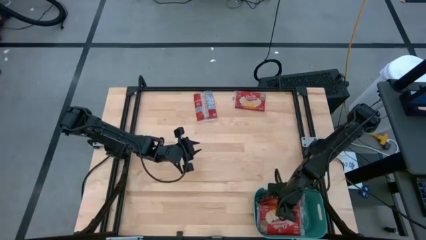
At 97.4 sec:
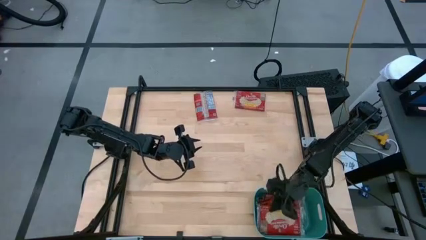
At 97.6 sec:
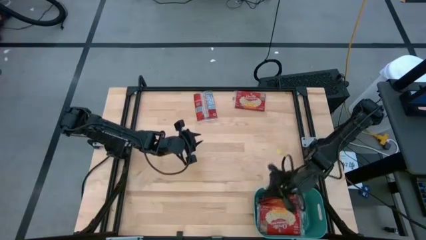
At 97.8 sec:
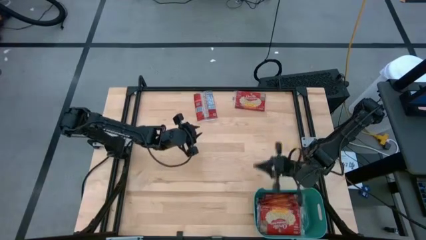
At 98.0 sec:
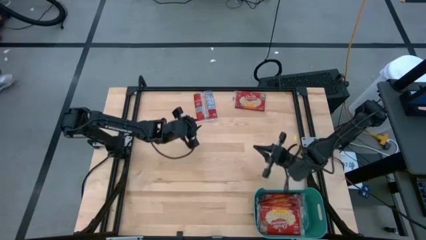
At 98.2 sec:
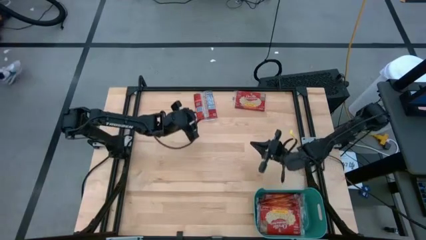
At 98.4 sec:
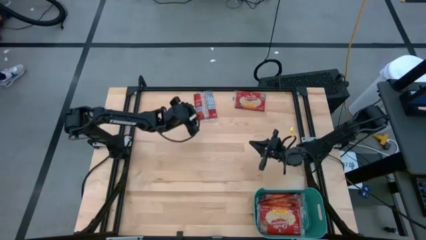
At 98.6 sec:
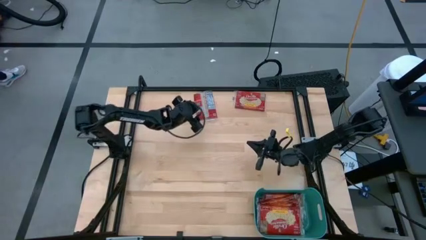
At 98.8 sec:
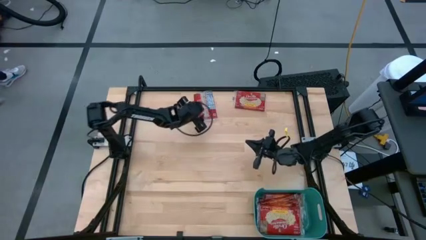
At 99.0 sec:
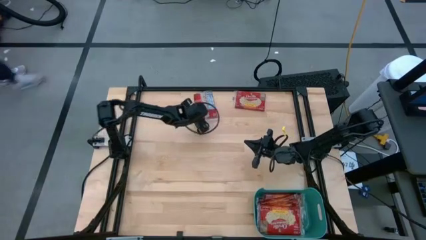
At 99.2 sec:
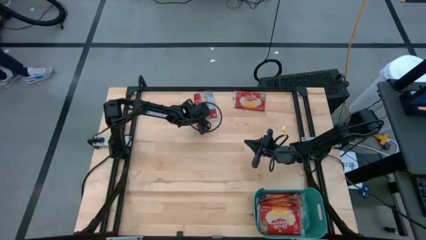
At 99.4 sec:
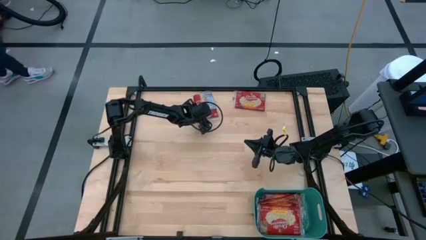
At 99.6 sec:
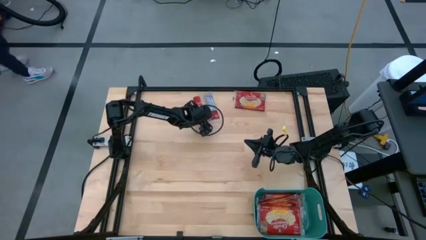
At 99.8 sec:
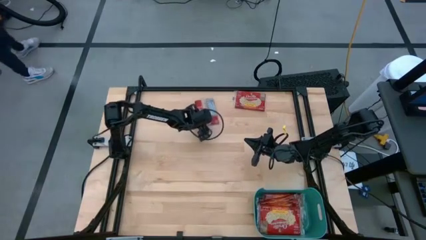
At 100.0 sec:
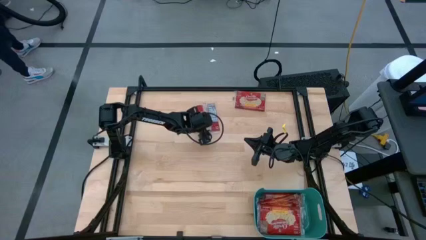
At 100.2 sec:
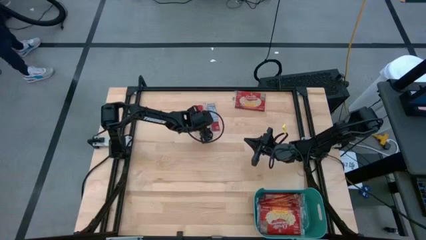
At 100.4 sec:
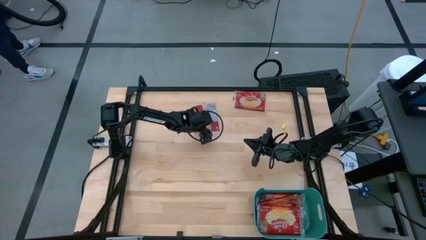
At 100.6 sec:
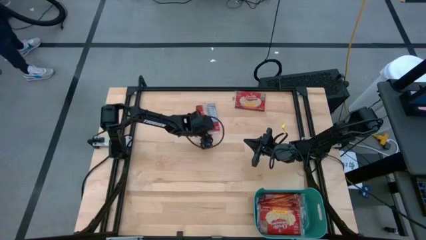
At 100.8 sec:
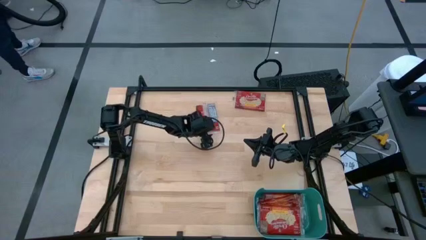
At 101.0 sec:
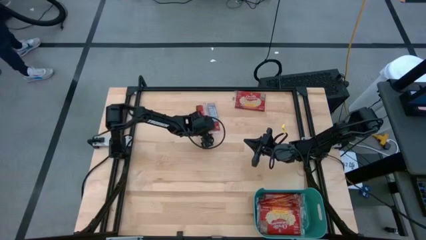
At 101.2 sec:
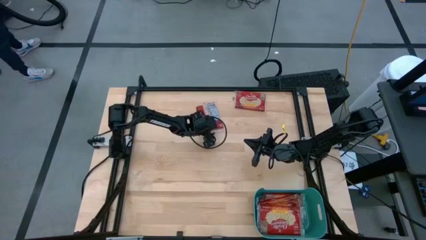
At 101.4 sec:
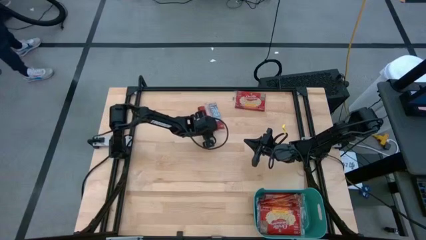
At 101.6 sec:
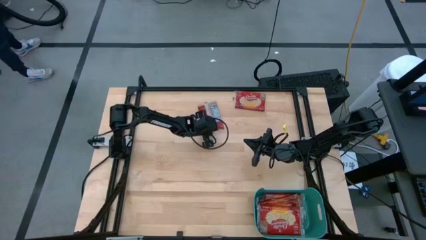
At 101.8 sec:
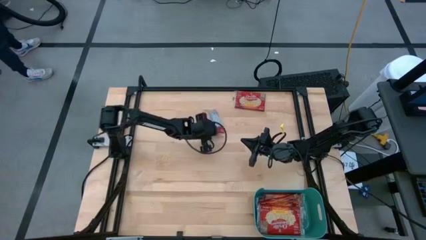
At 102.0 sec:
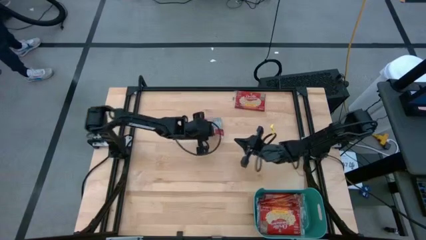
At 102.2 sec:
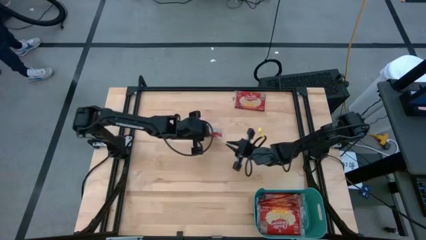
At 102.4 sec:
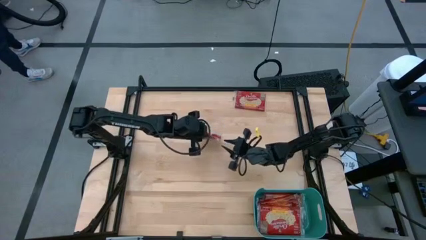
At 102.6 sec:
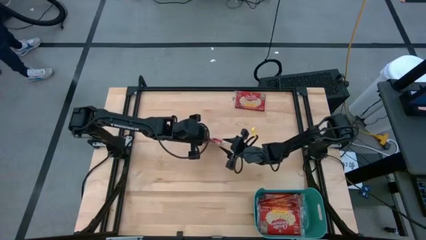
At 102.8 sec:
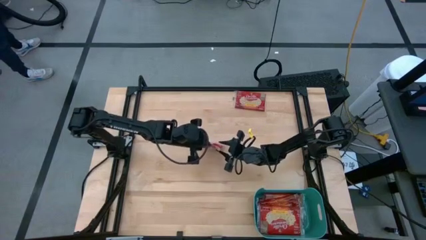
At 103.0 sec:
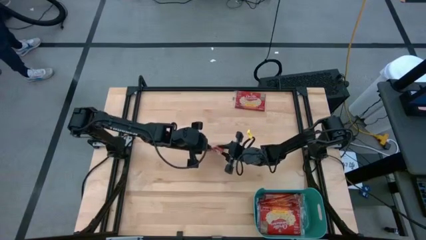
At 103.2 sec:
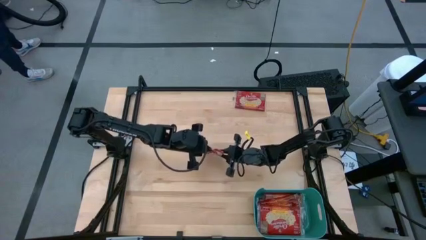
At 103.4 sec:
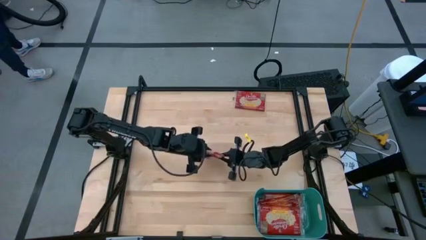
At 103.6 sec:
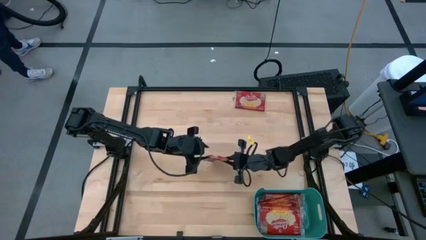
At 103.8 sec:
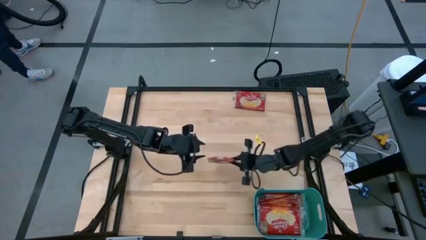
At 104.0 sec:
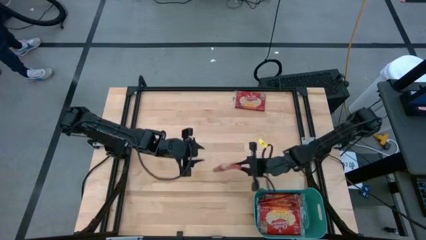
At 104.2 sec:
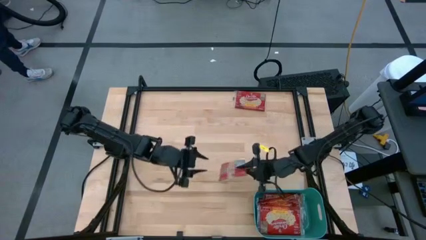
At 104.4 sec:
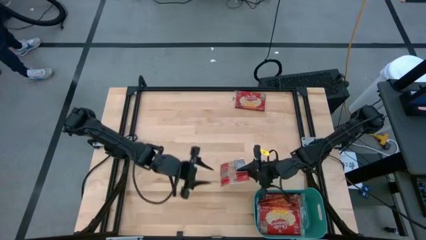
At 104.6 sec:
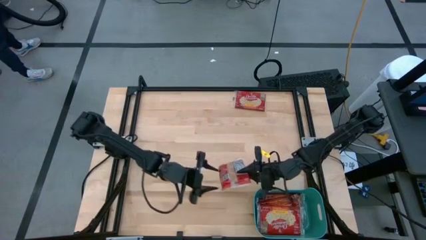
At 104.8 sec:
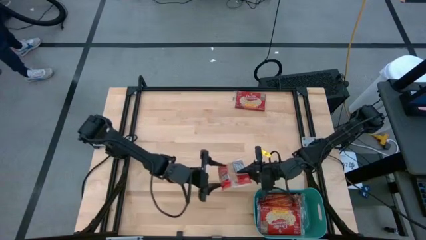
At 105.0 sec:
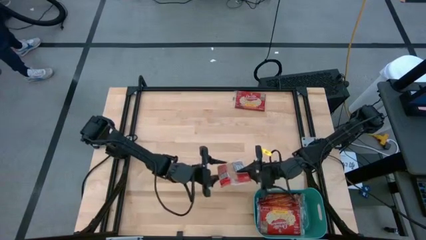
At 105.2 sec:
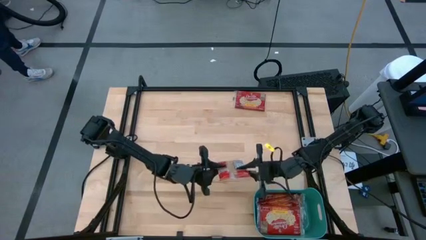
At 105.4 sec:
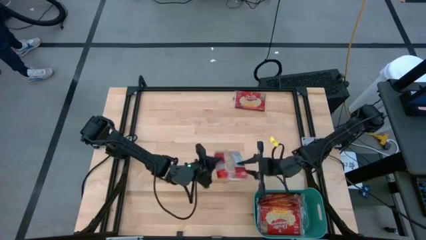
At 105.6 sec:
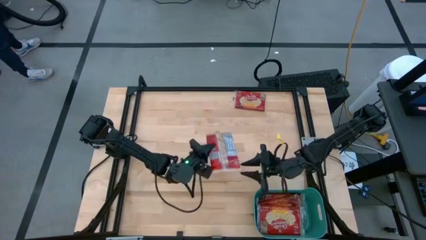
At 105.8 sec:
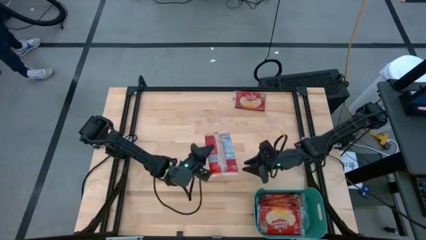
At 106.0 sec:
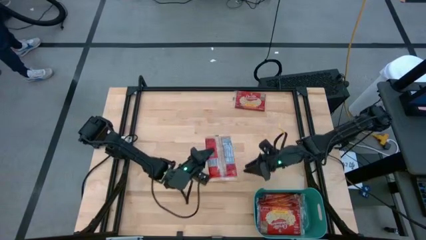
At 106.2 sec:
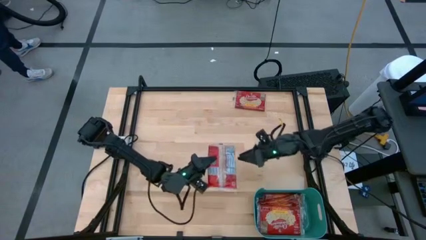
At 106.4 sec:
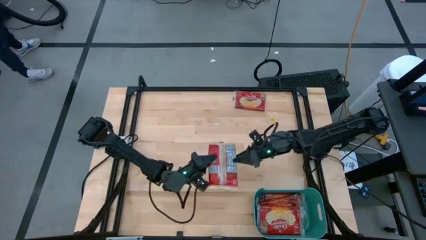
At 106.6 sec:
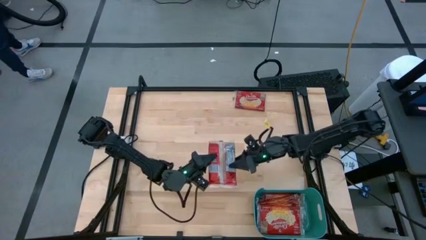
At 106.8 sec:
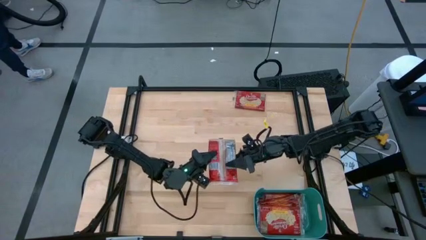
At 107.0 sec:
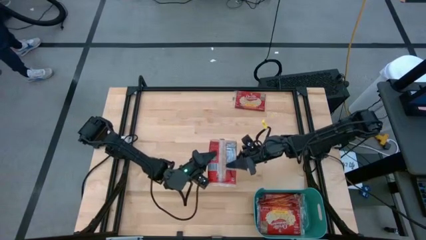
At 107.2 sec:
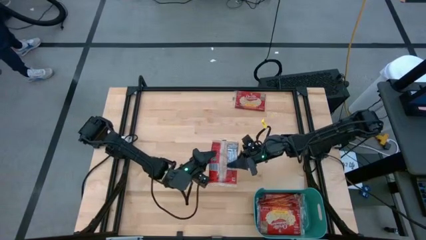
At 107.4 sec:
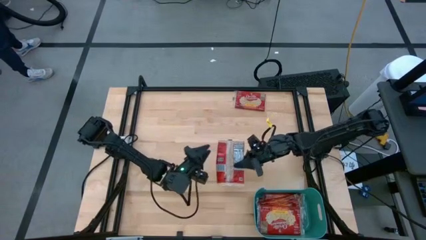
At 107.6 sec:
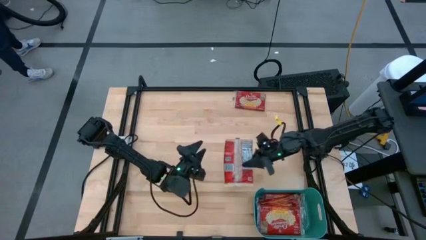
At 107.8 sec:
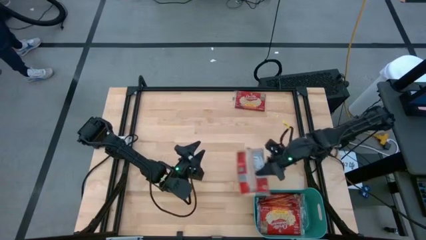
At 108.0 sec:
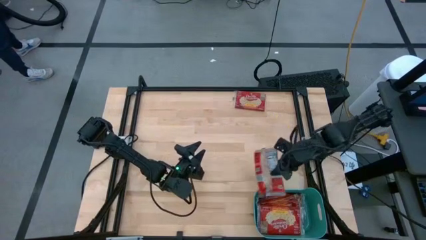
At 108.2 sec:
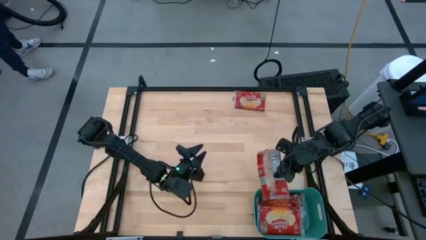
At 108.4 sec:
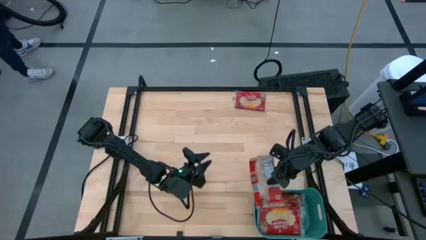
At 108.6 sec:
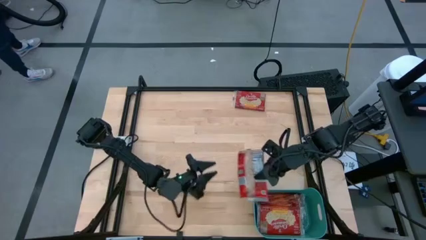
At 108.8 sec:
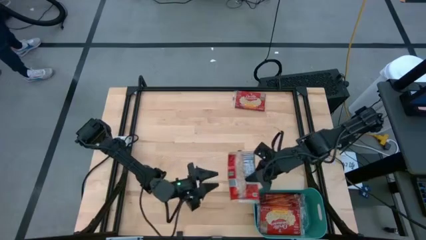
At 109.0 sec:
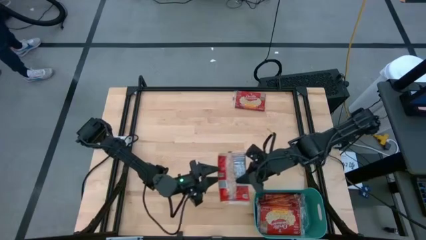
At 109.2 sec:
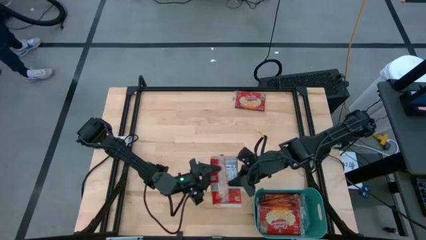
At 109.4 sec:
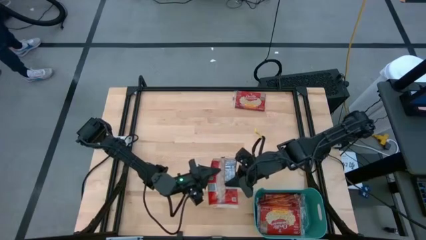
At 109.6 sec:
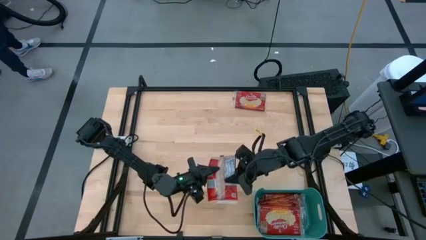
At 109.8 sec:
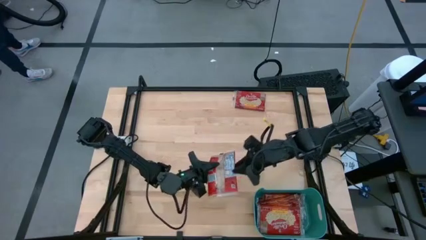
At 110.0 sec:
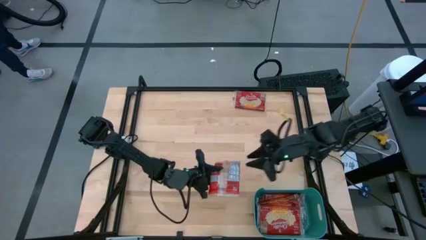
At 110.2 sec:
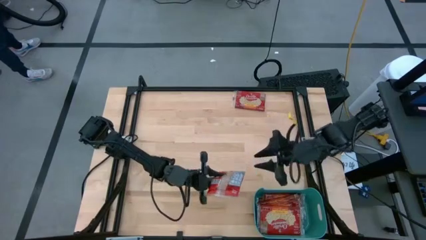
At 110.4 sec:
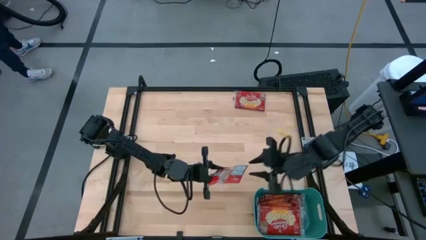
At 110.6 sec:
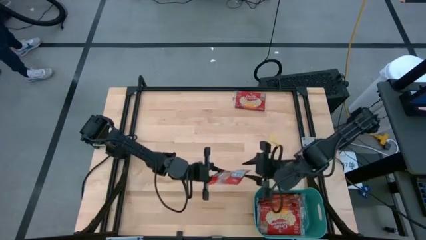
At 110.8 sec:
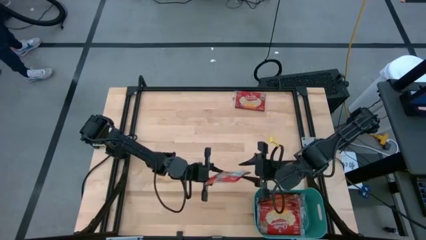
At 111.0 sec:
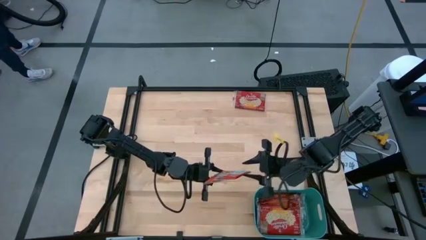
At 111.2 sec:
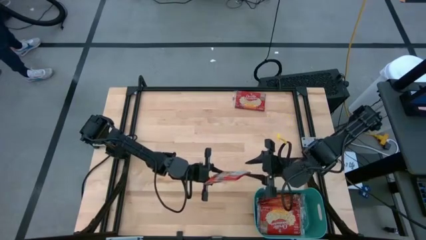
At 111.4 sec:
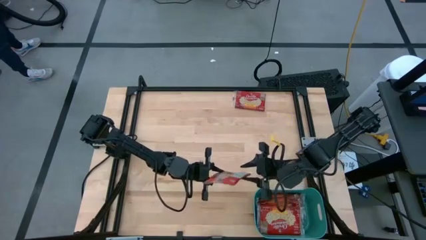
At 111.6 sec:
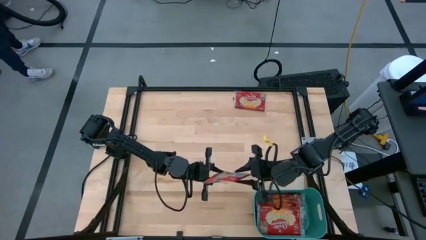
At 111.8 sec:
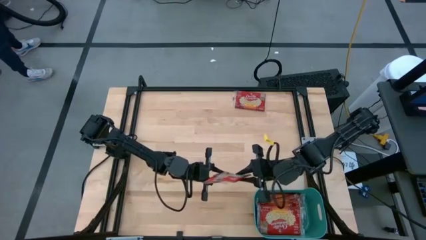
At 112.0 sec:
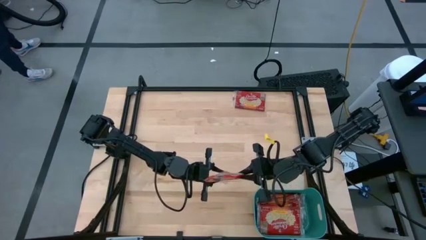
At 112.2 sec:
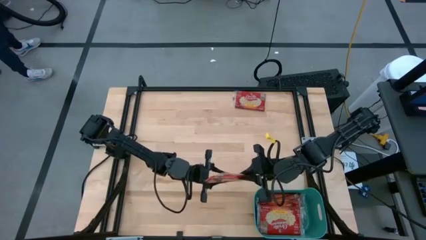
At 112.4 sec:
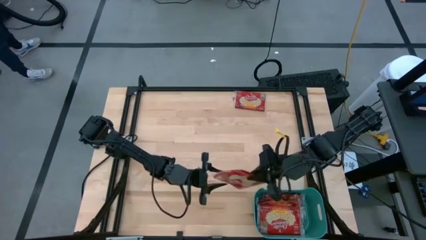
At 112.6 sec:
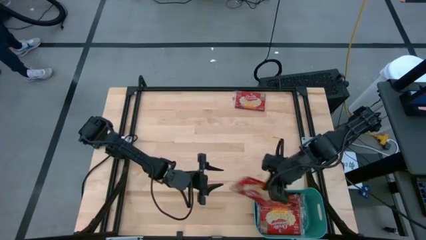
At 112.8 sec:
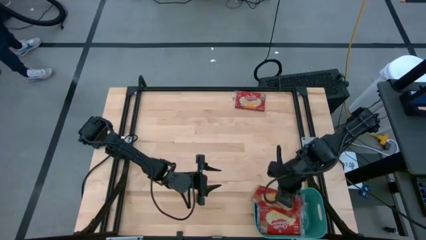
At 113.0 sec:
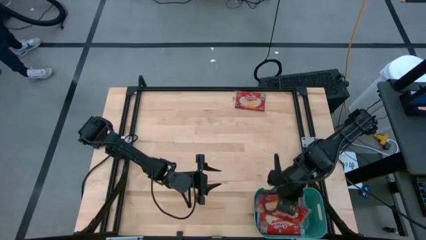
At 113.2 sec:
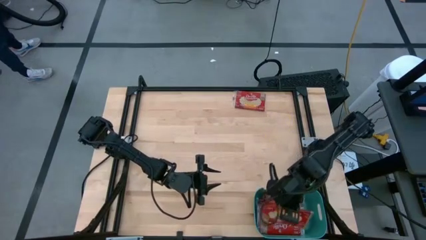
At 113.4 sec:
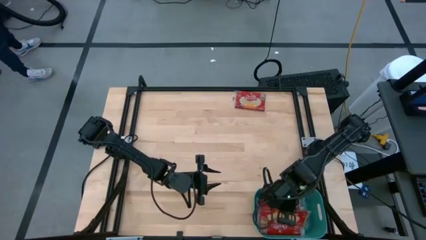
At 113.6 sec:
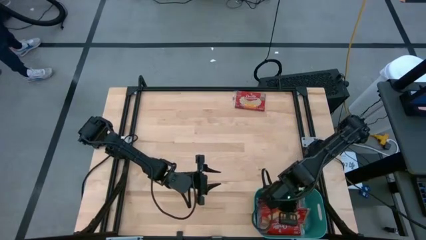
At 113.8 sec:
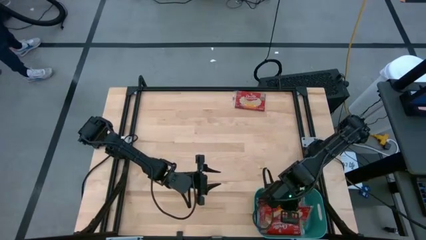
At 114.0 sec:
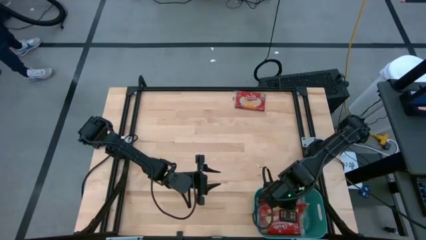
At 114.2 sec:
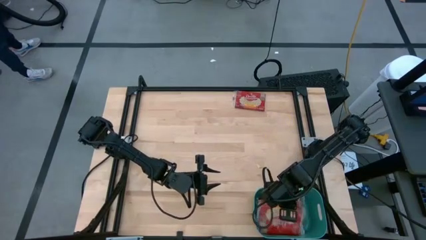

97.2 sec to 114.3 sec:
Task: Sort popcorn bags into baskets
Put the left popcorn bag into the green bin
